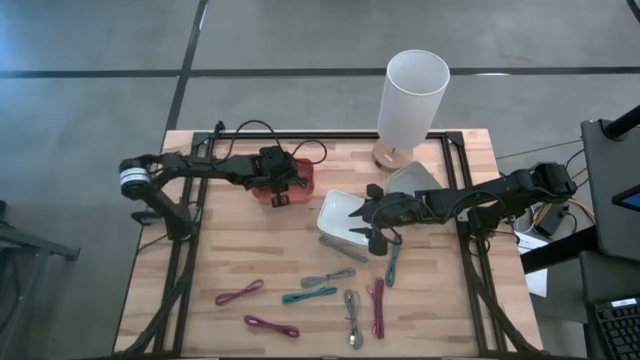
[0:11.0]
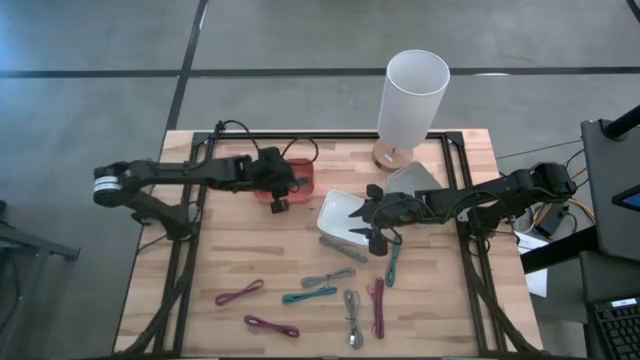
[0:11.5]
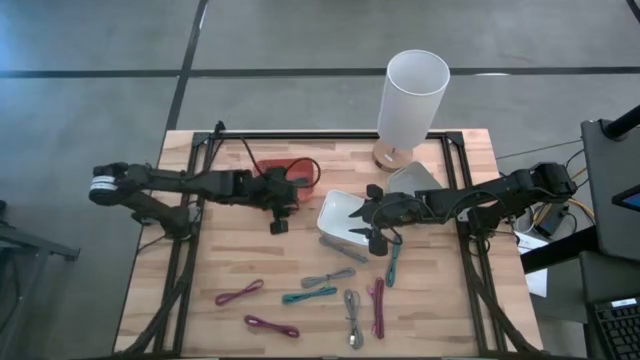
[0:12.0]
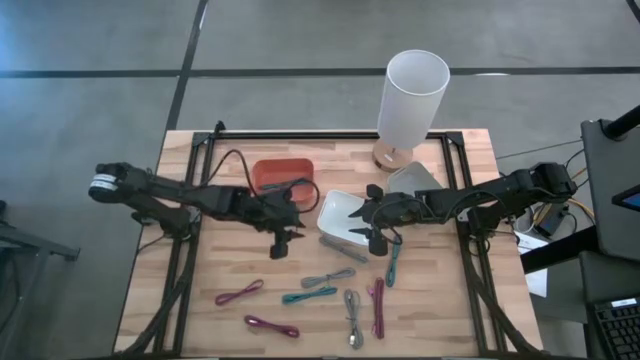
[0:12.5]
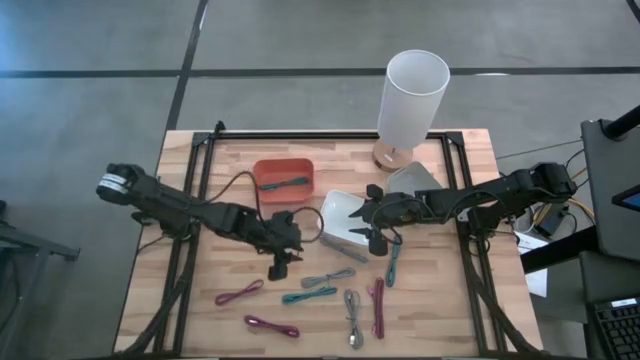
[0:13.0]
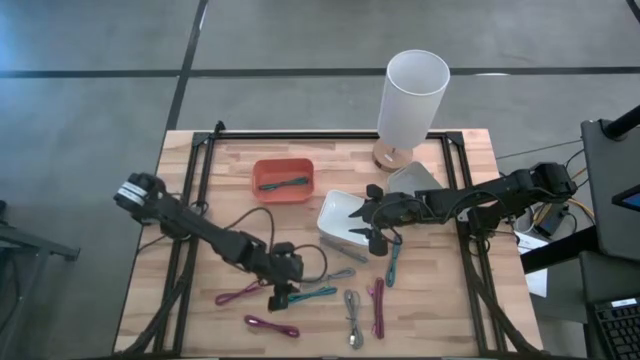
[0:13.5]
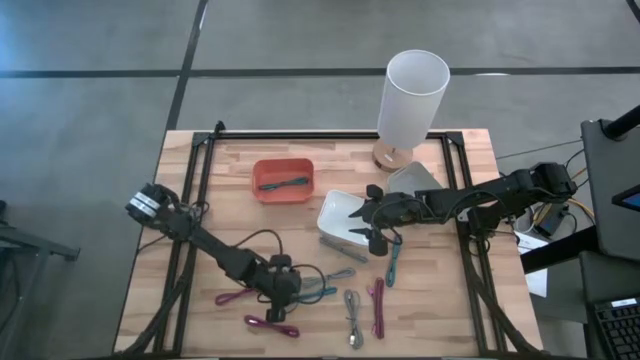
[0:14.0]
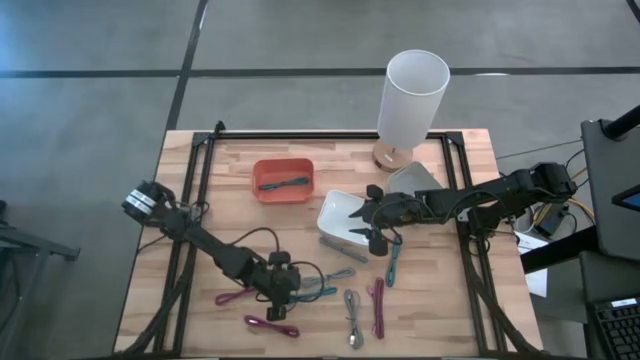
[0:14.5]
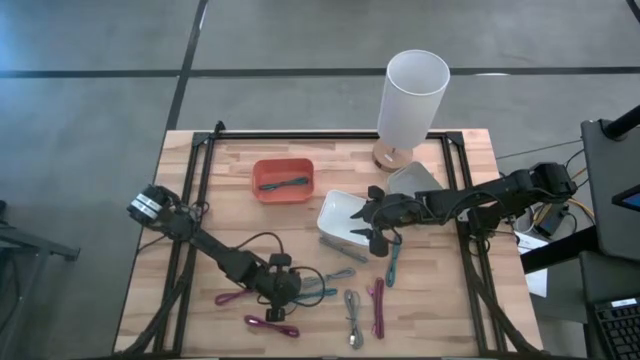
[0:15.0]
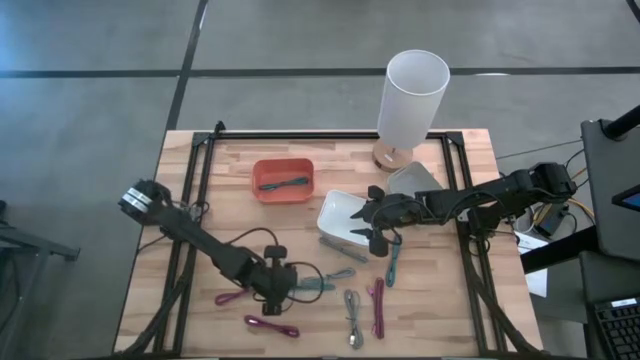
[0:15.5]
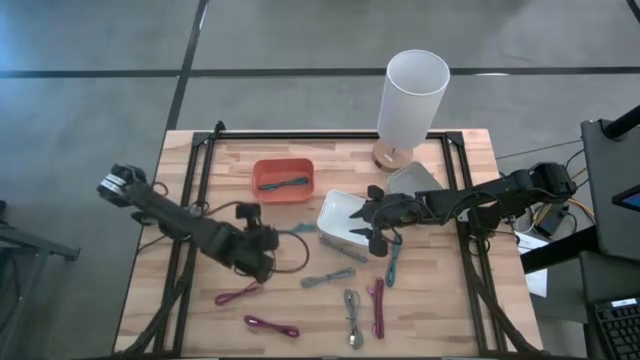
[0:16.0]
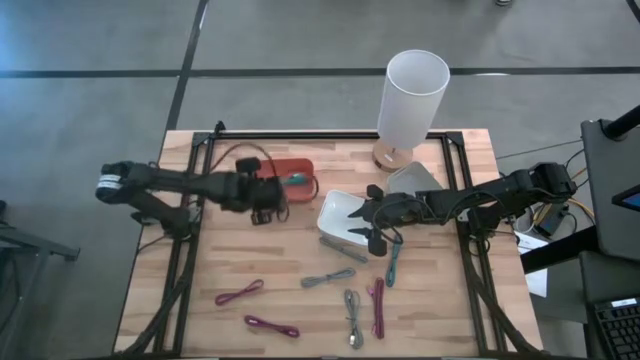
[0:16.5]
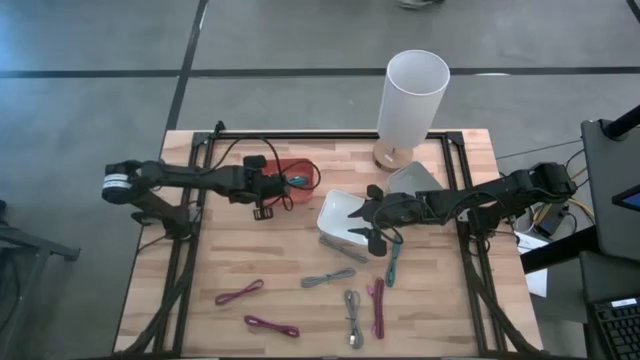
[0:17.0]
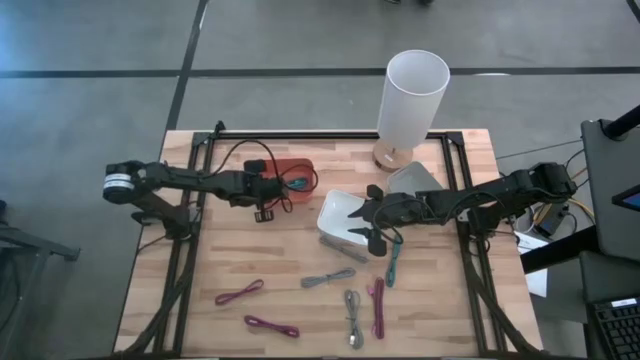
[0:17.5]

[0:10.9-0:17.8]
Task: Pick & Place USB Port
Put the bottom blue charger cable into the orange bin

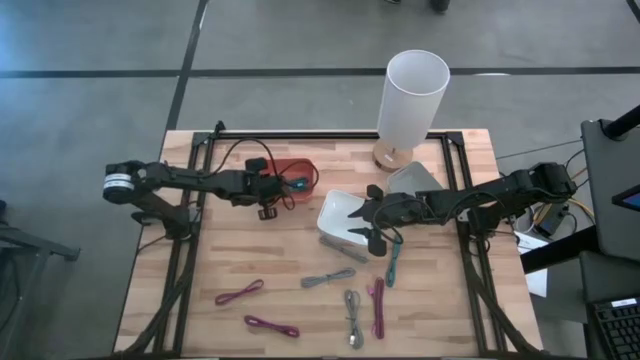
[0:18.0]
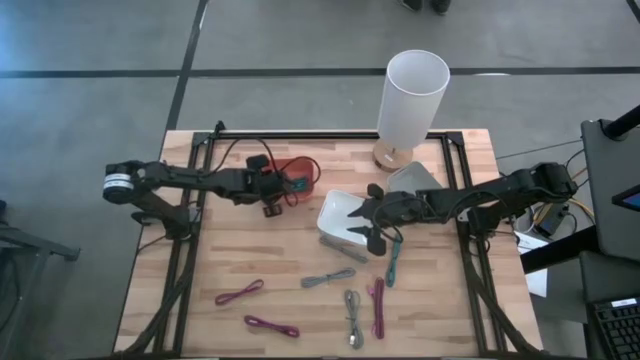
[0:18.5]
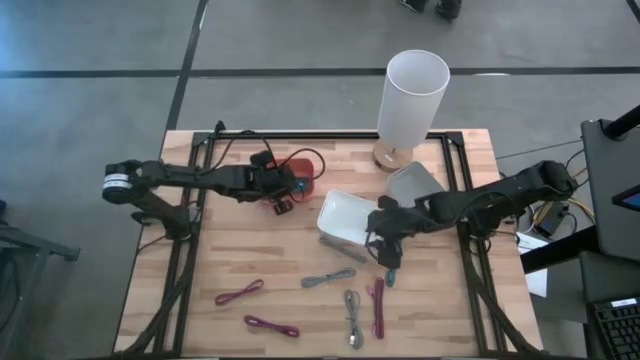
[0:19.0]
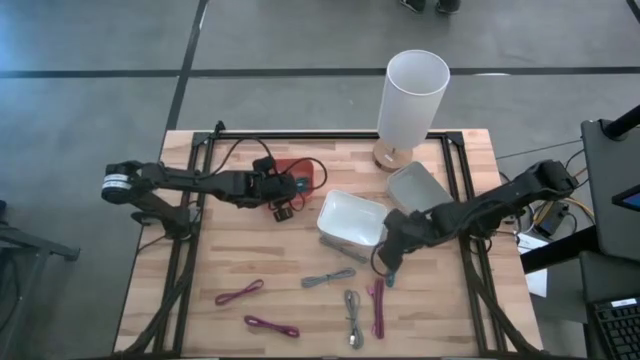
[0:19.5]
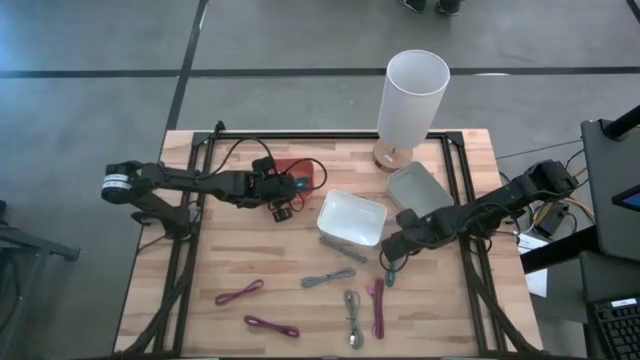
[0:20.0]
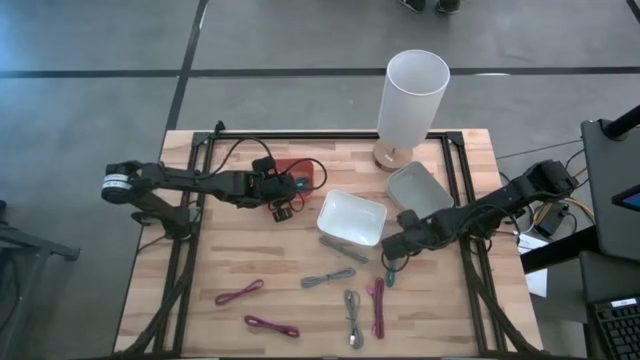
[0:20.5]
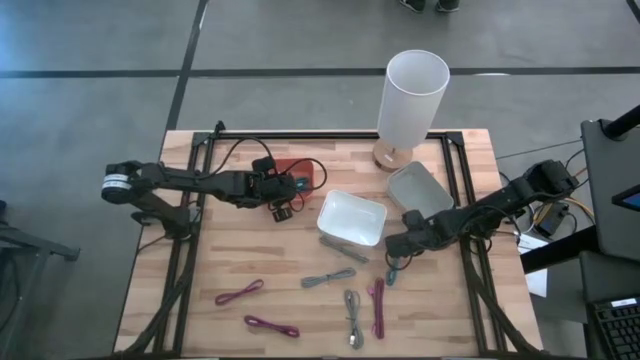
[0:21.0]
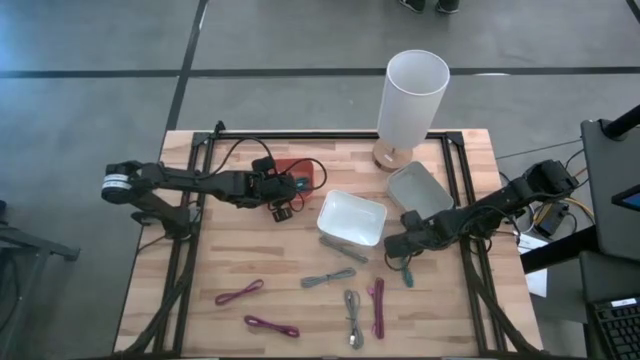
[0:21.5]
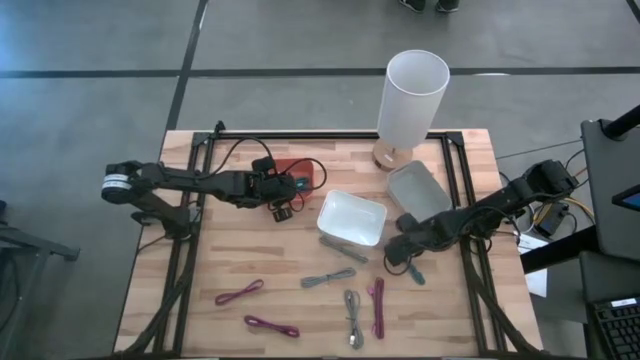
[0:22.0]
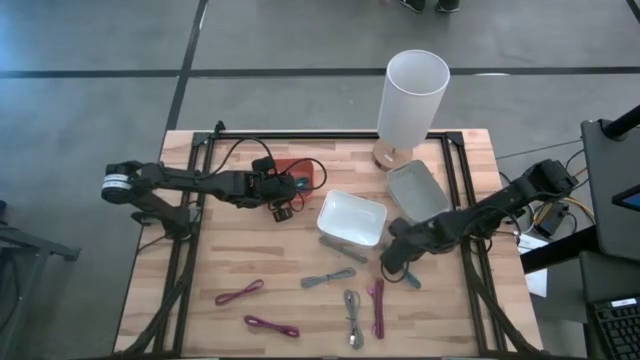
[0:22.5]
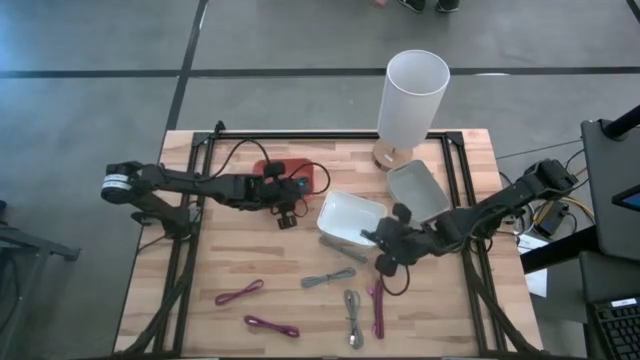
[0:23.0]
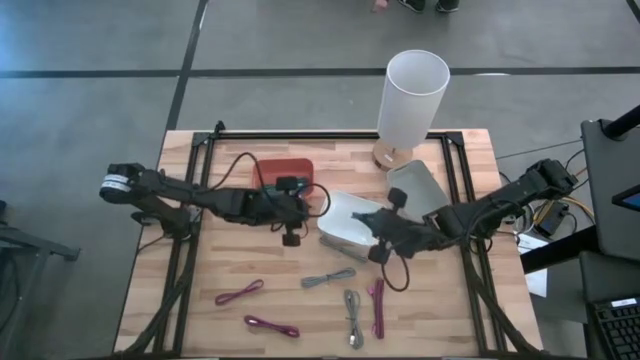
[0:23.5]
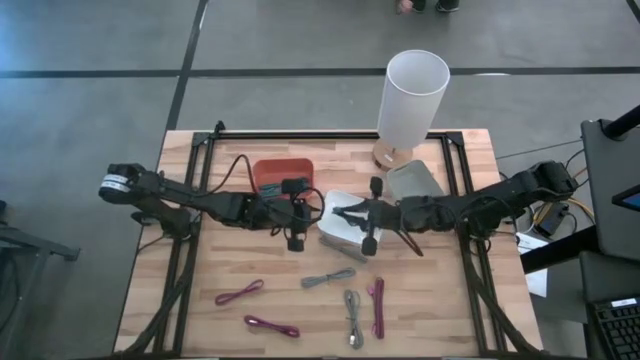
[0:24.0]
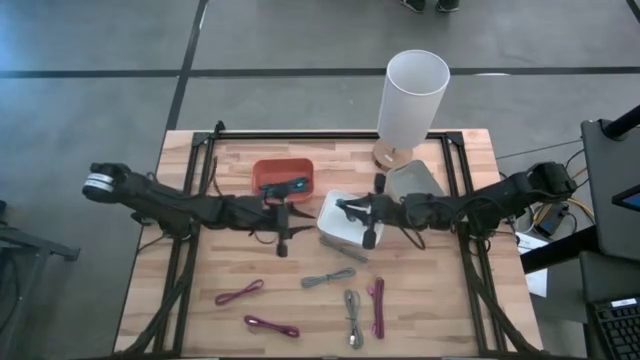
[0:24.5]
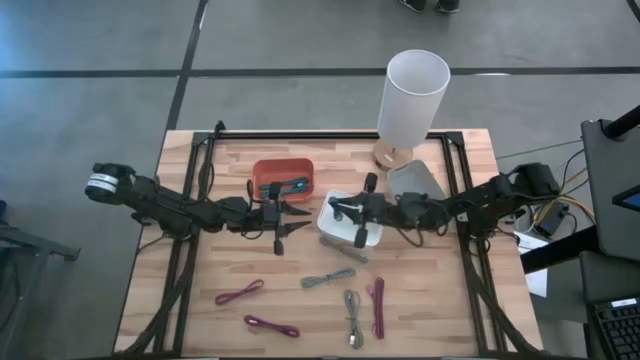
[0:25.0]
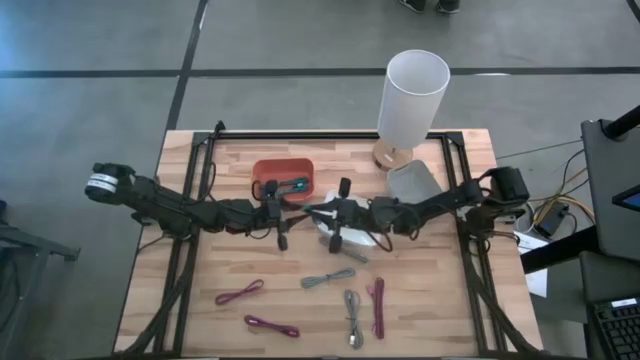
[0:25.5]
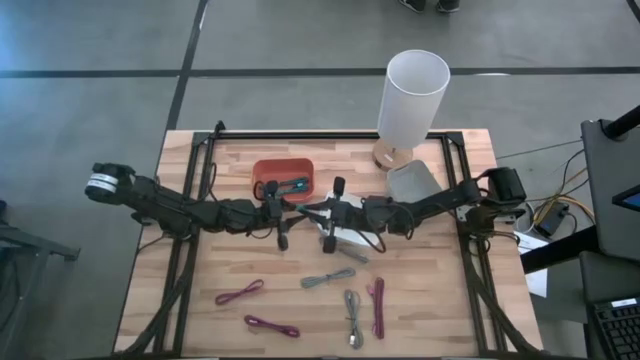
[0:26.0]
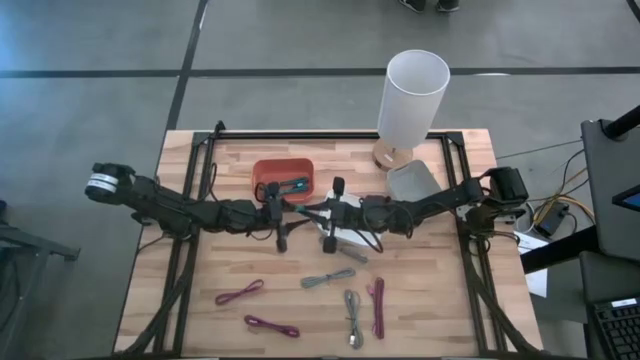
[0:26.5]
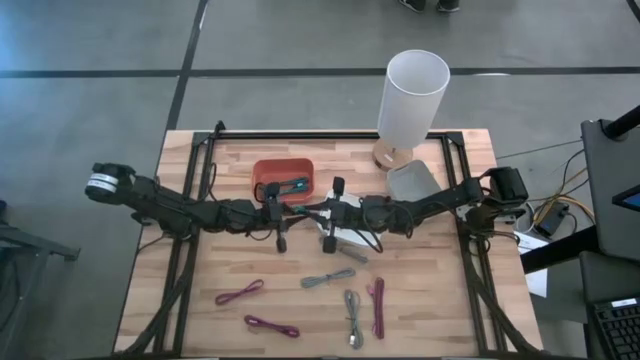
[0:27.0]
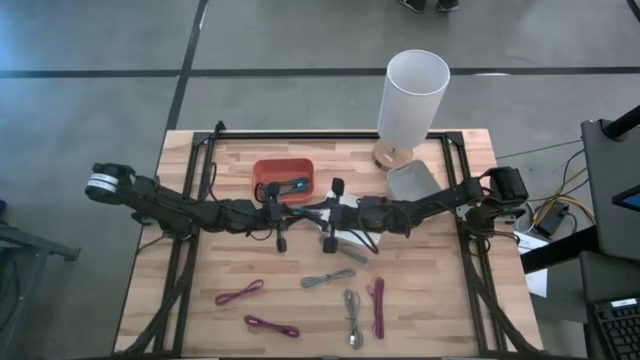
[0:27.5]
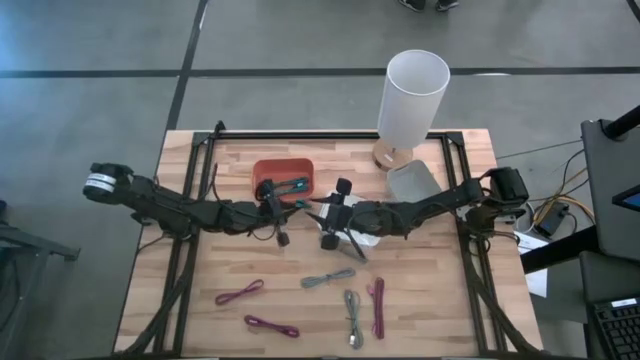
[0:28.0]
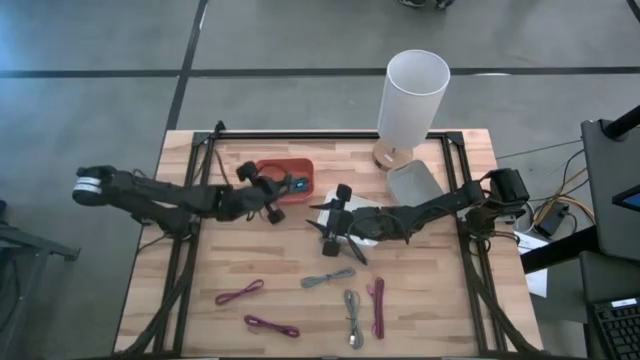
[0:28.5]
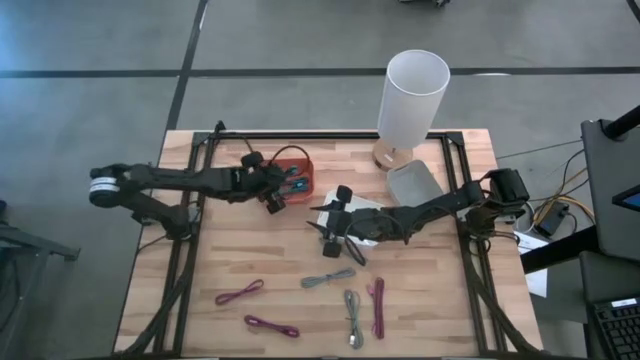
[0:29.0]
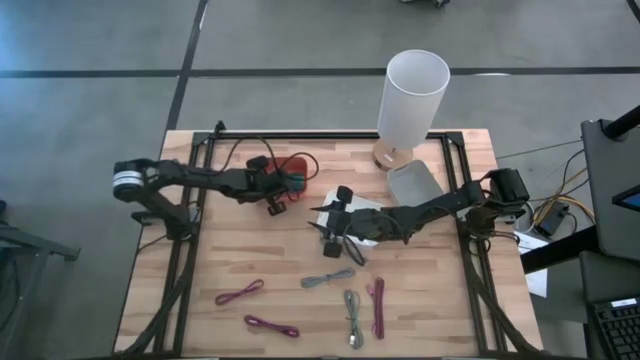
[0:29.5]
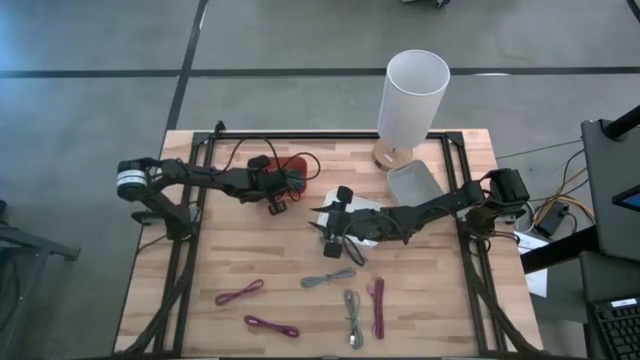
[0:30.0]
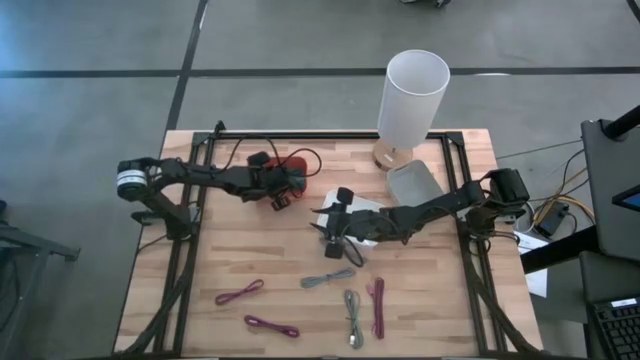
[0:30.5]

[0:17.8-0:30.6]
Put the blue charger cable into the orange bin

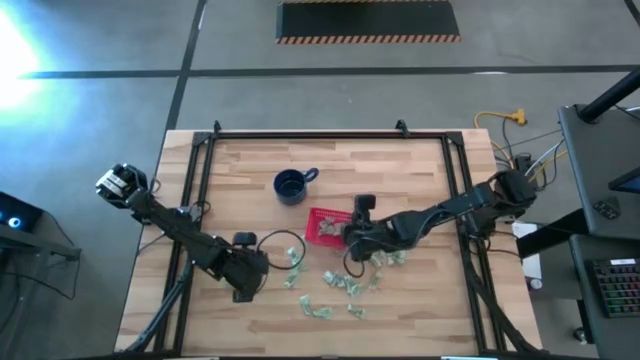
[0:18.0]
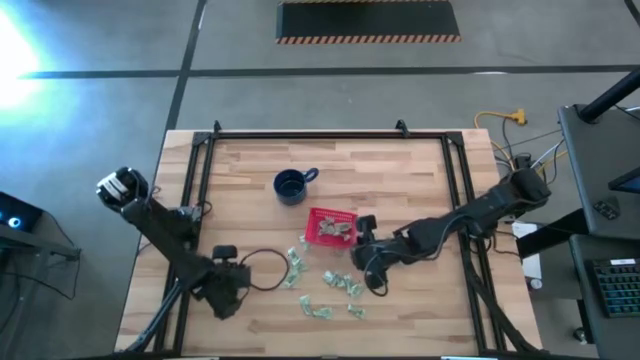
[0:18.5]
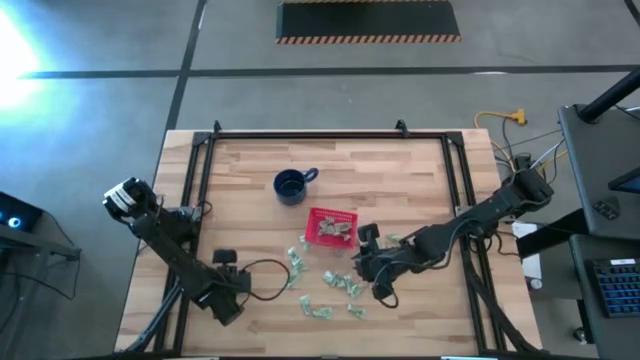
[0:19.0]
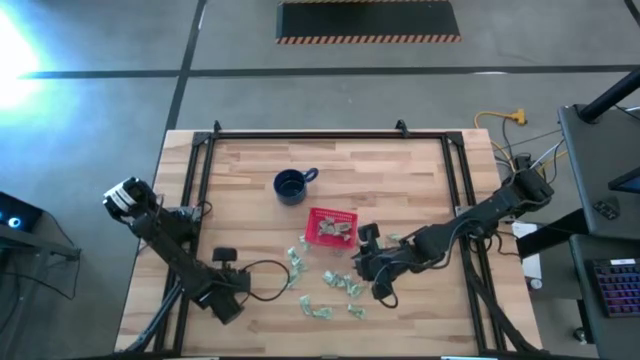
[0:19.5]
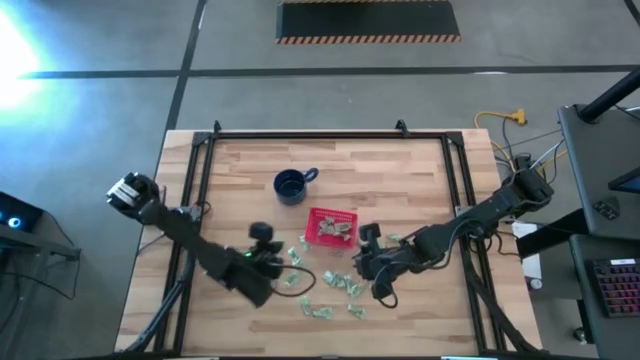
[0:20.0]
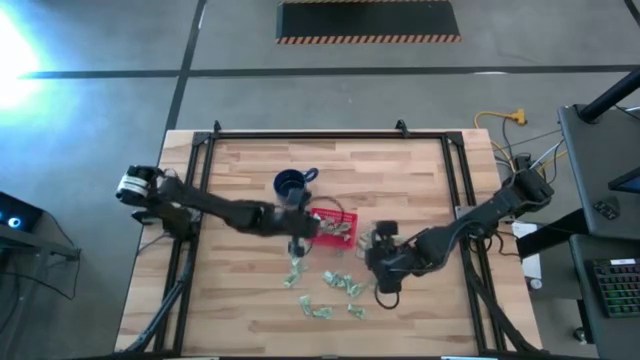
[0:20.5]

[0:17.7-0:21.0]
Task: Pick and place Stevia / Truvia into bins
Put the white stevia packet into the red basket
